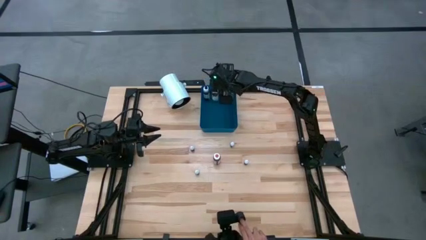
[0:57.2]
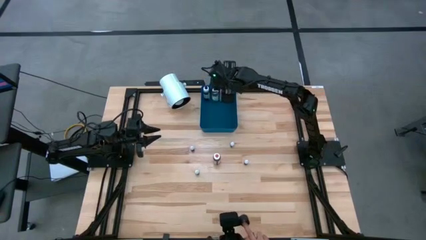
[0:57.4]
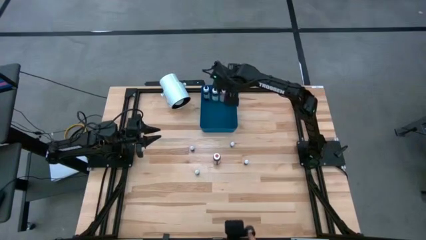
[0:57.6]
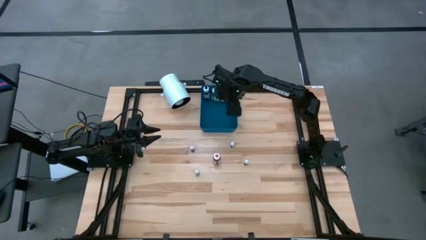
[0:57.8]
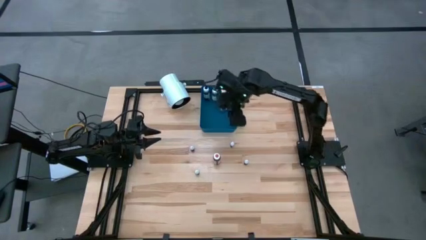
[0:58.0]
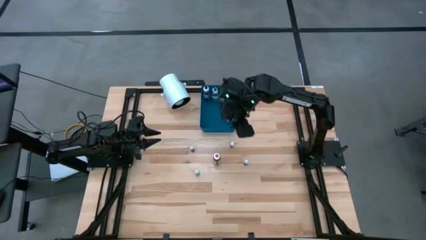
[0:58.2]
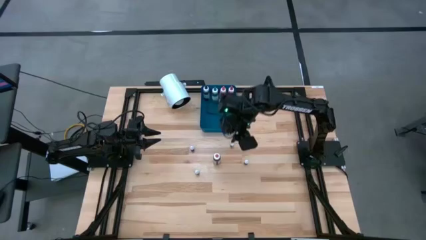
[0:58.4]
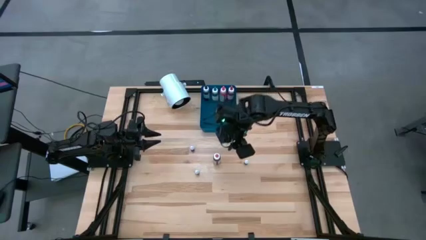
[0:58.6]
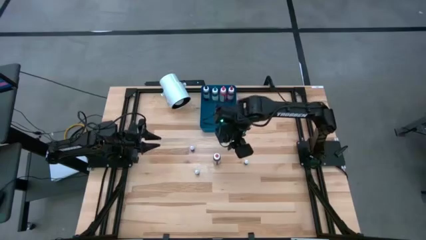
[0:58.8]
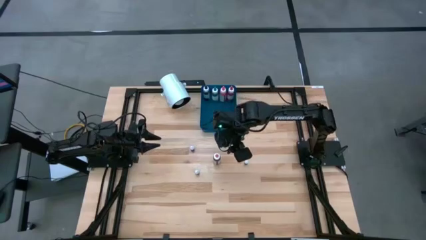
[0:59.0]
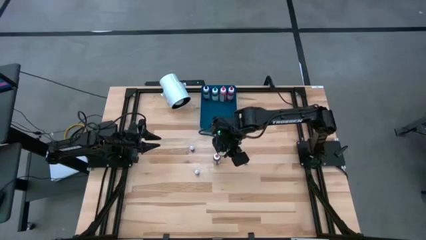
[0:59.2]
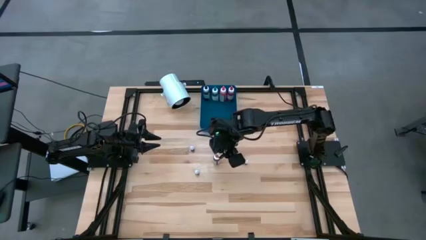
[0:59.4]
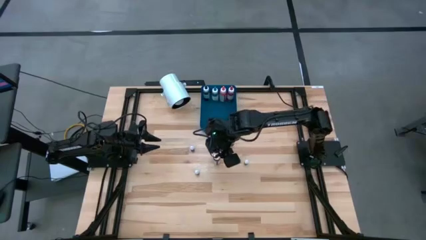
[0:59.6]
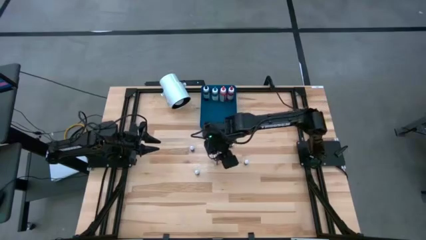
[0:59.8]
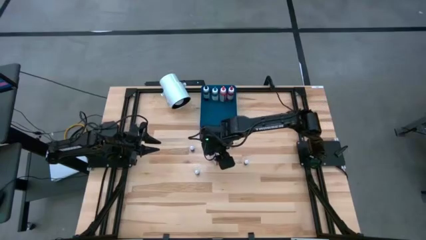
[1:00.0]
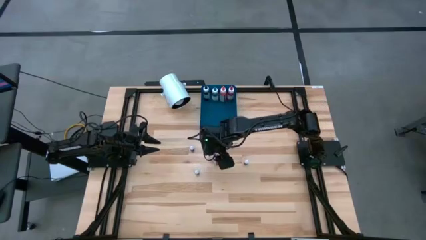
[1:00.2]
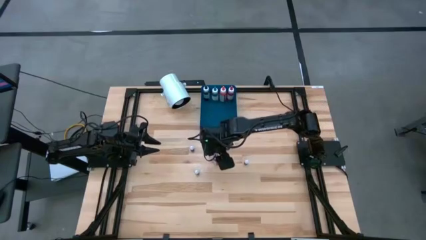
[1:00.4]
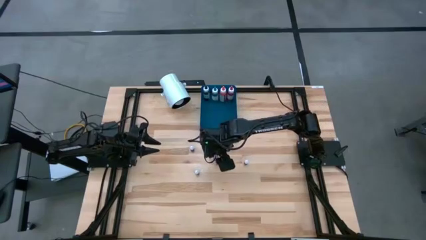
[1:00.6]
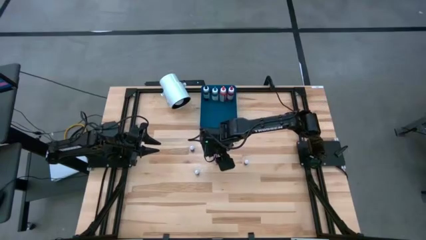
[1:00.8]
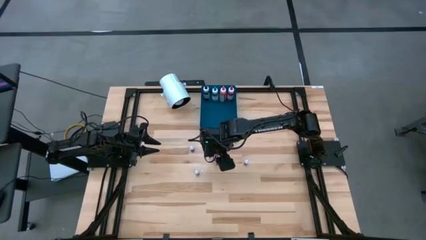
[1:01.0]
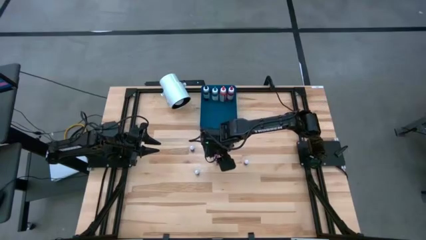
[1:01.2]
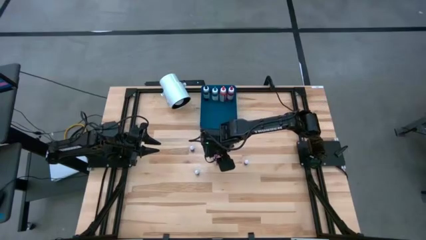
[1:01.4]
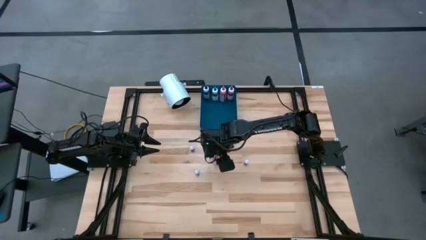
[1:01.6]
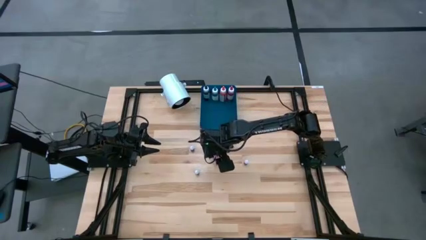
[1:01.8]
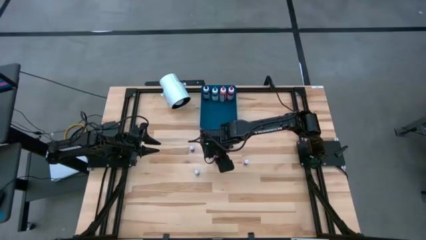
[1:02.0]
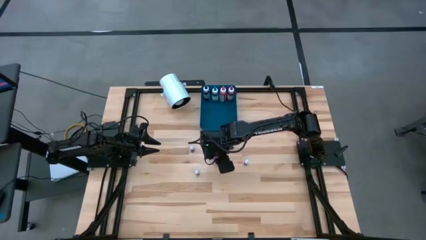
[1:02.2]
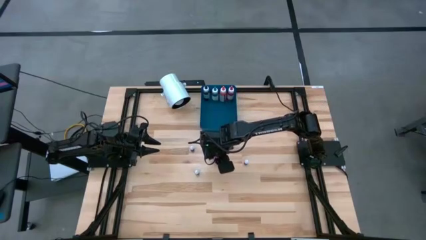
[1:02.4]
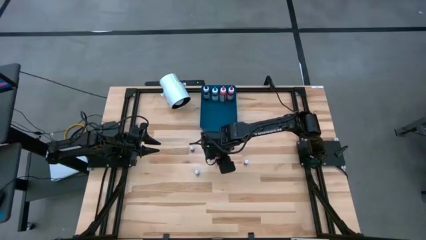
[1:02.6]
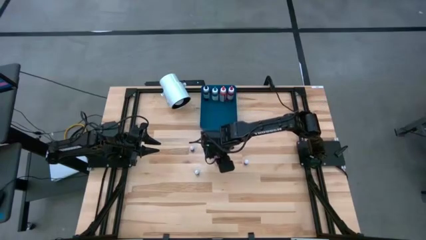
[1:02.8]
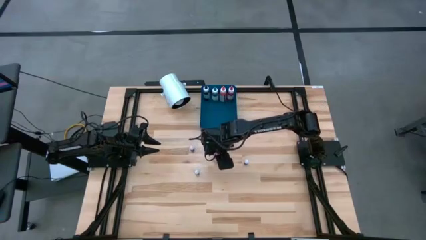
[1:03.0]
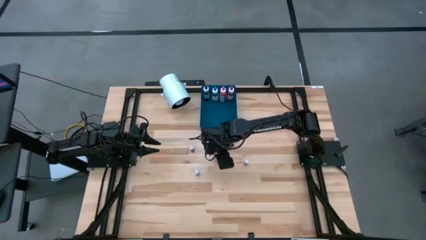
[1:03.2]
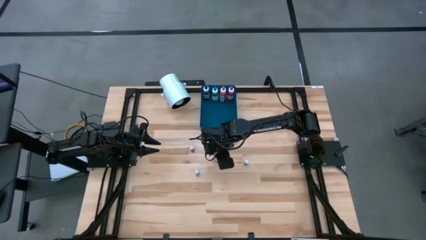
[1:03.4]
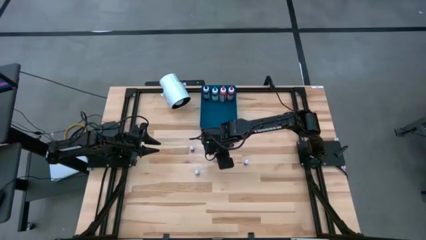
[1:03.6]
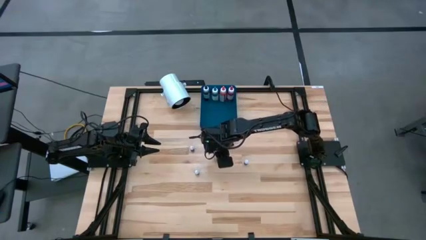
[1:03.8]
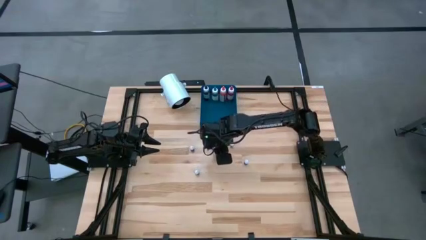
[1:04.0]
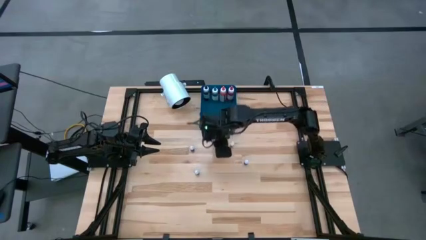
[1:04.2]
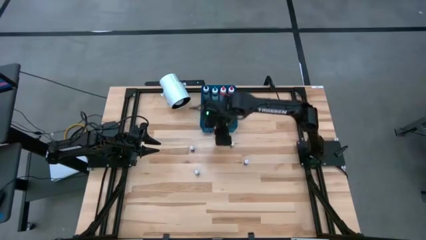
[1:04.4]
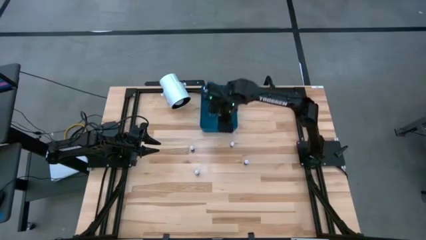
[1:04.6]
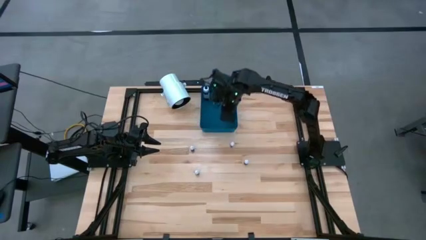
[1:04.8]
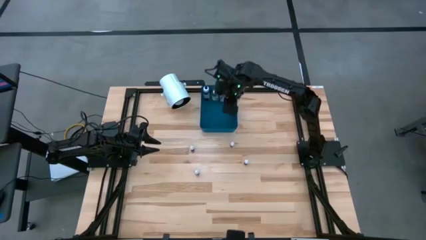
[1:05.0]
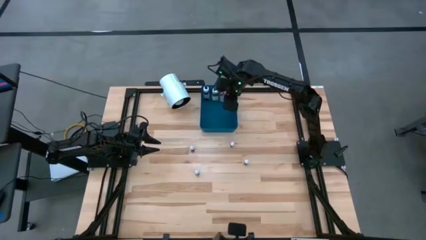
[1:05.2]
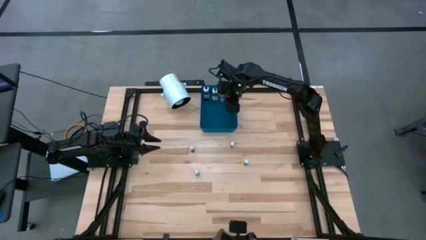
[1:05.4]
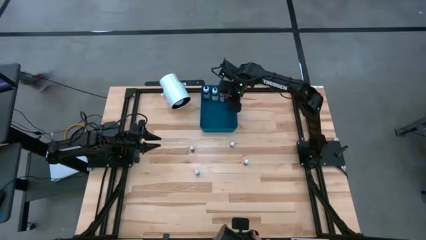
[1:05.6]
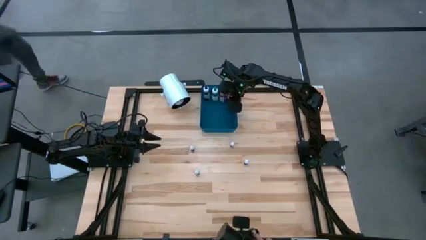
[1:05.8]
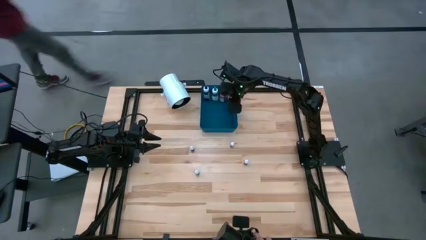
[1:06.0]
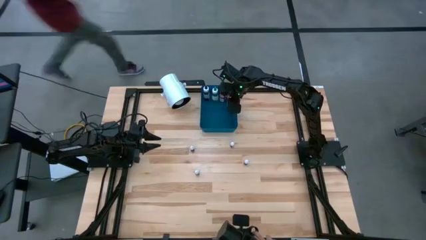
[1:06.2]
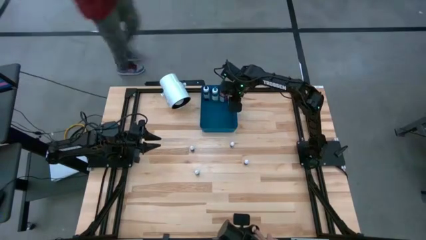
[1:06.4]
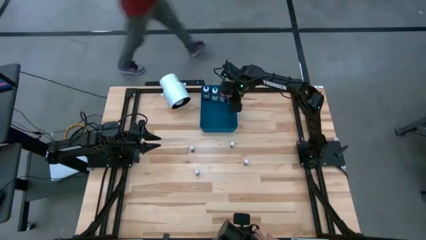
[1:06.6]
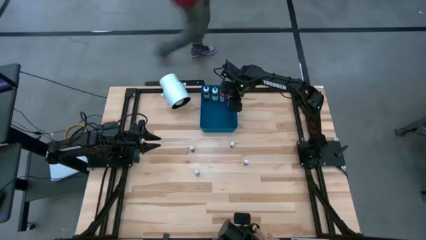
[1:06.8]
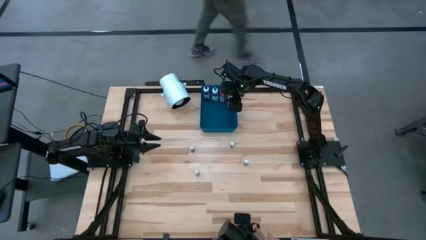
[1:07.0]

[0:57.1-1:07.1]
Task: Pick & Place food coloring
Put the large pink food coloring bottle into the blue bin

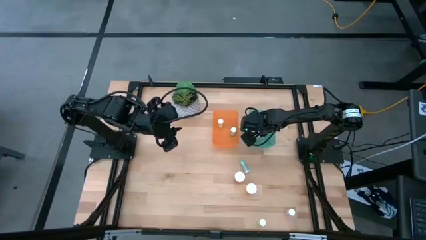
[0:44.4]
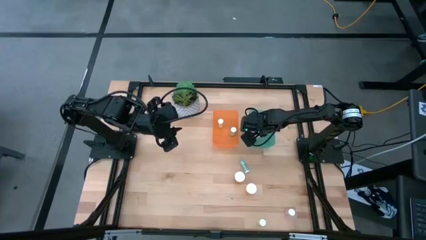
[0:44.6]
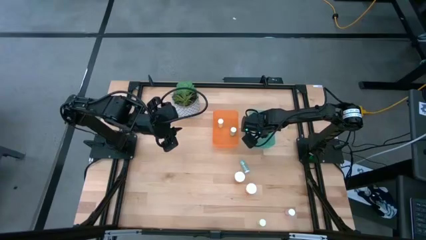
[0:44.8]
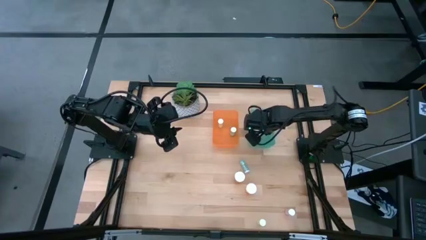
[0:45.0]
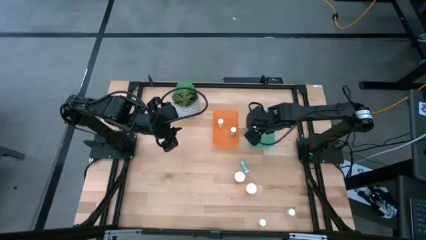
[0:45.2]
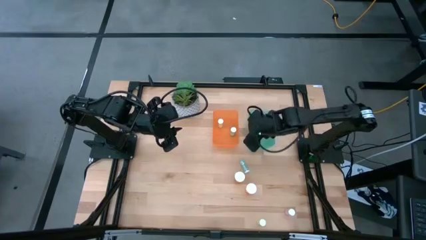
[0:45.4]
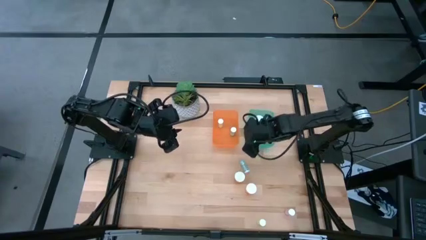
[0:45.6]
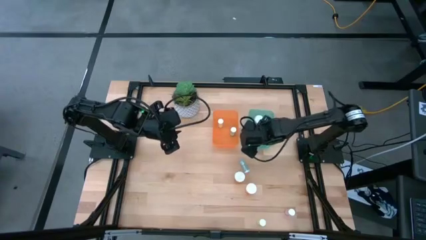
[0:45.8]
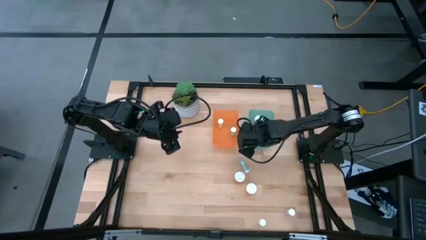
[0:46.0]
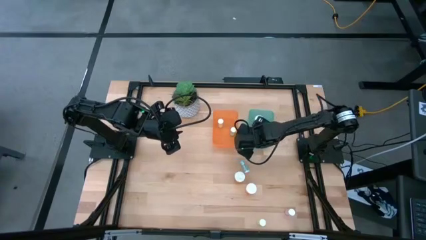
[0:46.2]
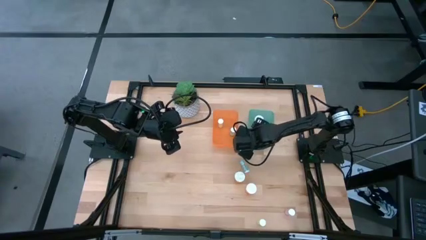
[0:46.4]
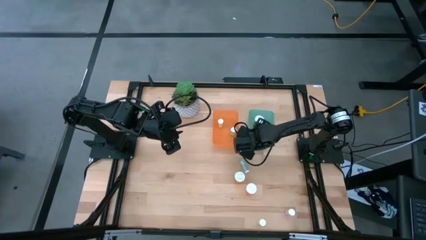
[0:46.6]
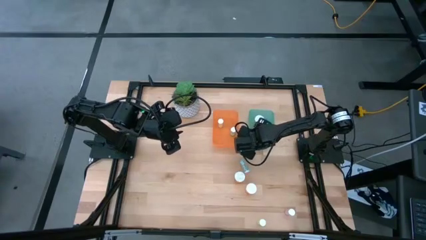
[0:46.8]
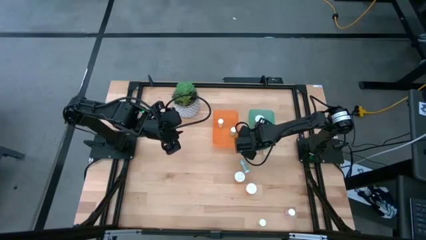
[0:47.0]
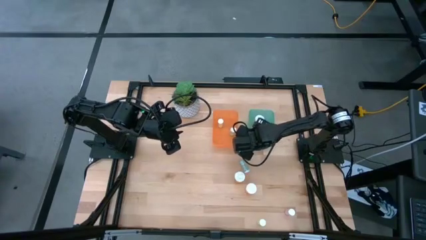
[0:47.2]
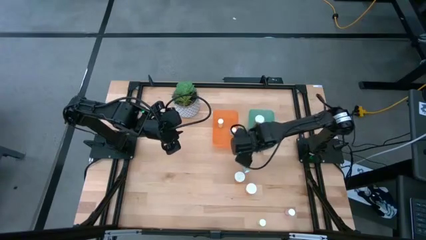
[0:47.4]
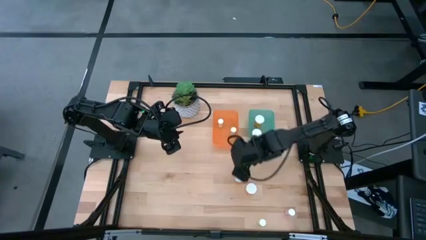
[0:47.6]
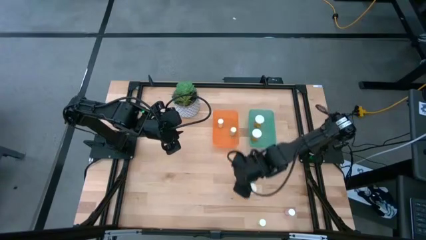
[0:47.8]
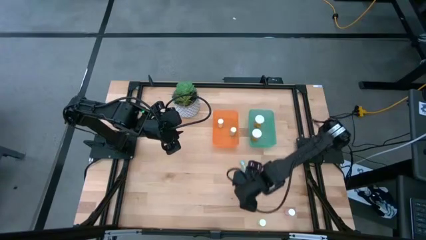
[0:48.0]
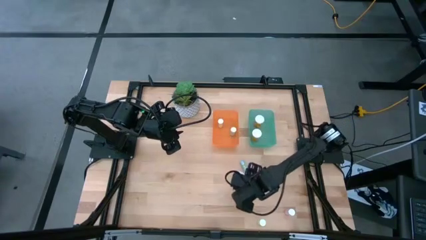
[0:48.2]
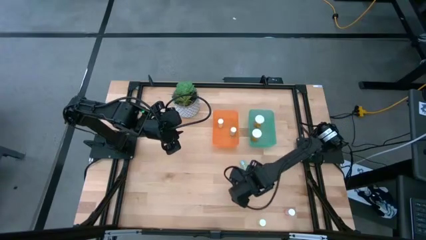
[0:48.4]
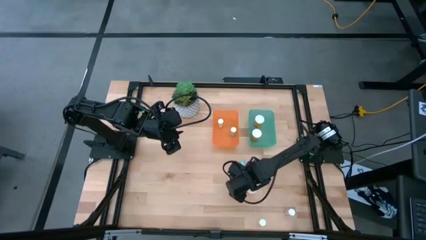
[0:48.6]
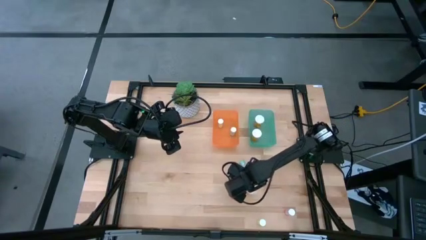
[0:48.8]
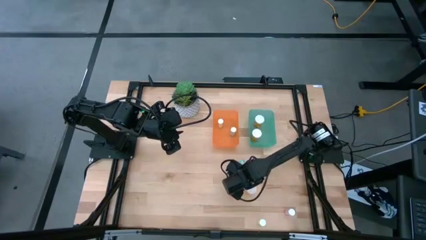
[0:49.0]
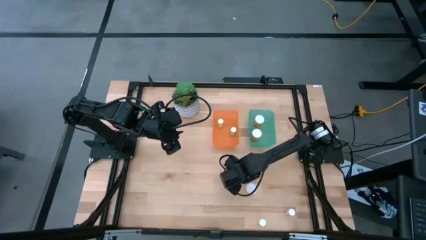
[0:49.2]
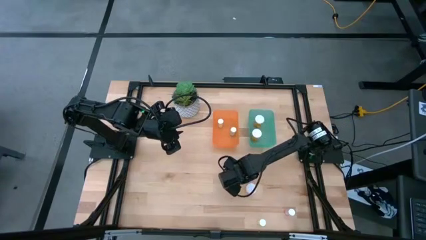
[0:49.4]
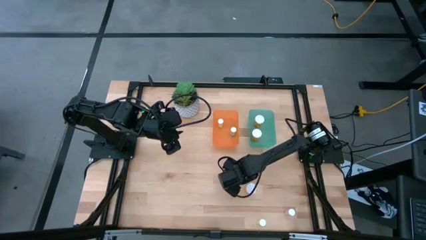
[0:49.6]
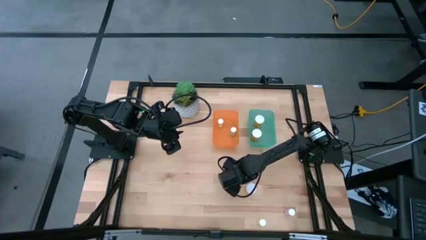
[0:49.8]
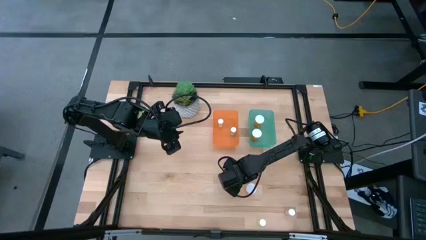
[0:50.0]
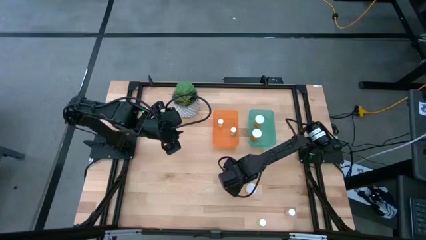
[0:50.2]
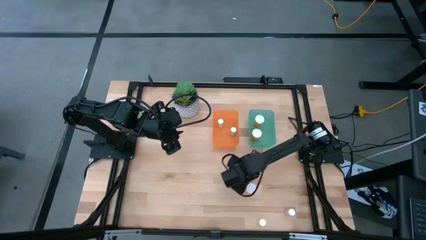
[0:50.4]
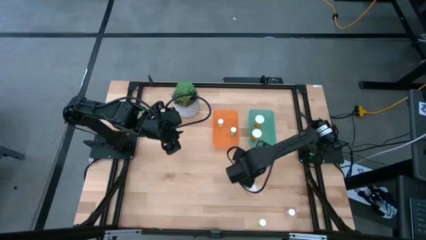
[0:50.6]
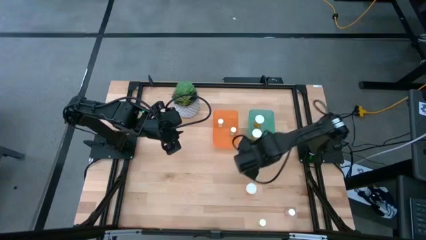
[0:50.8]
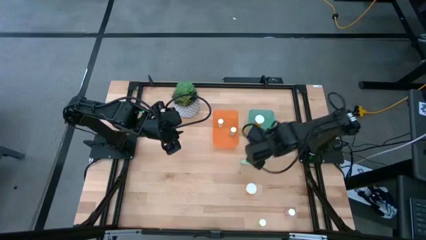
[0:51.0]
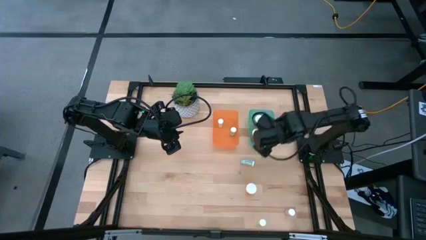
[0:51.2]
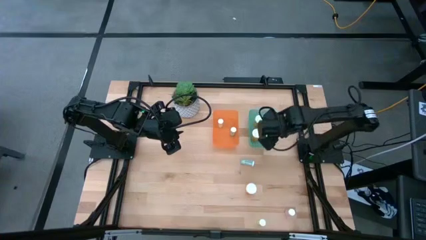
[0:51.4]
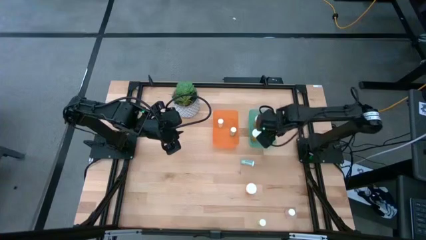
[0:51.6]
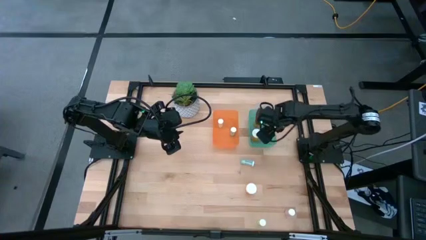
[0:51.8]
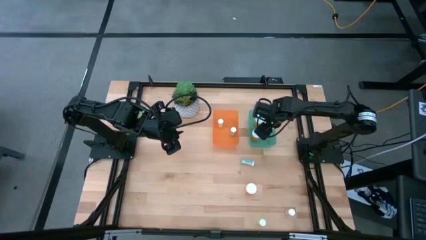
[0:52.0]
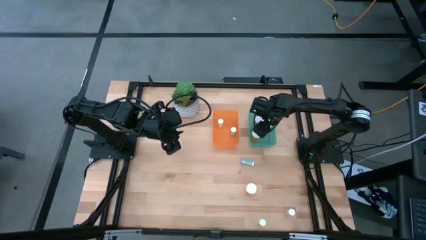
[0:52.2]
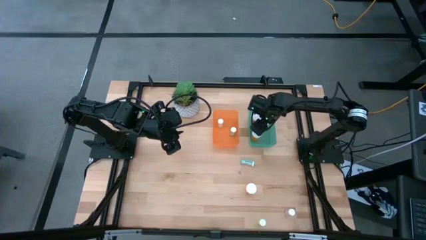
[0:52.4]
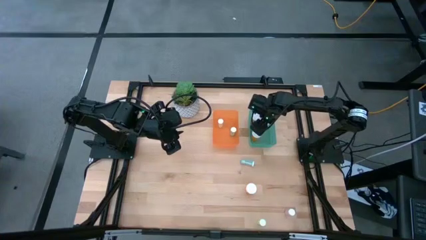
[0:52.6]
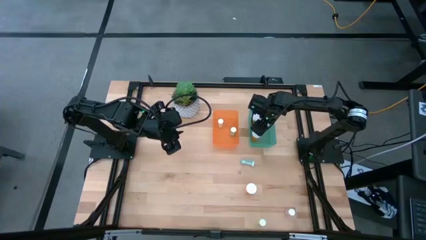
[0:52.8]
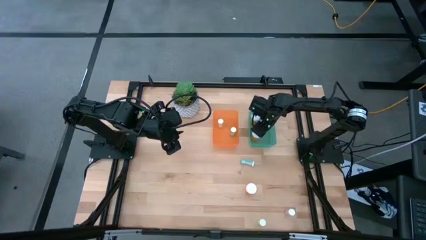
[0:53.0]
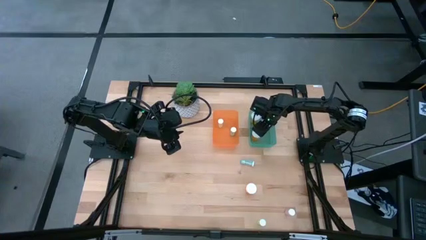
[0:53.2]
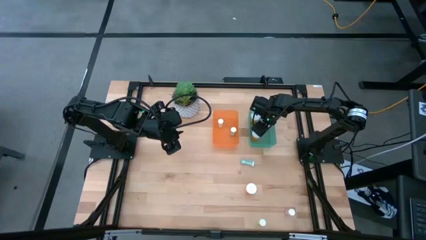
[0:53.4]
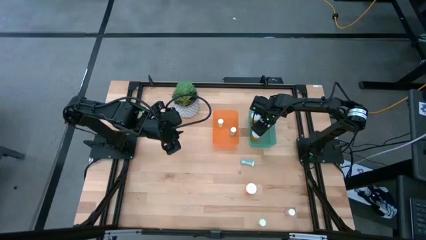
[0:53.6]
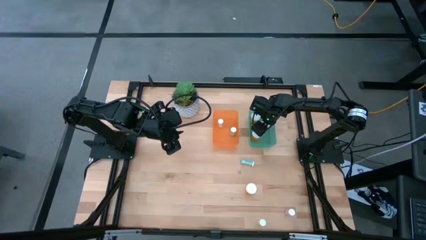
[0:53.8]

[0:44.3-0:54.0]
Task: Pick and place medicine bottles into bin by pill shape (circle, oval)
Put the large orange bottle into the green bin
